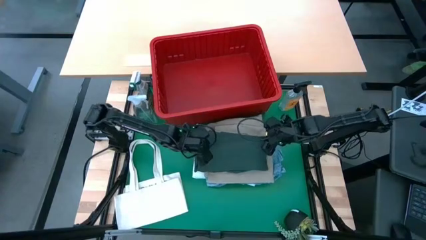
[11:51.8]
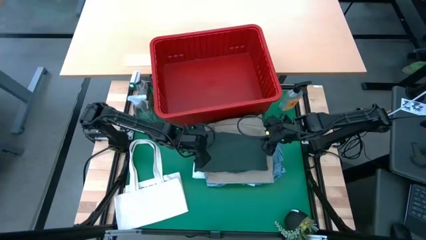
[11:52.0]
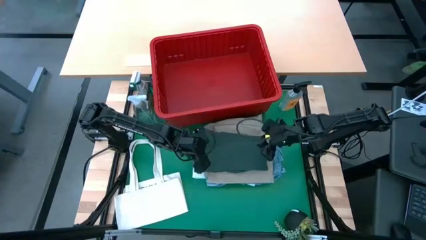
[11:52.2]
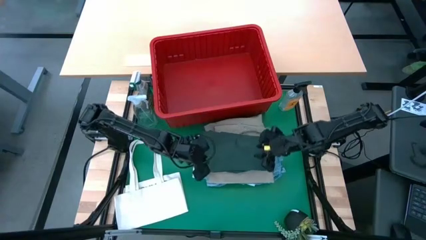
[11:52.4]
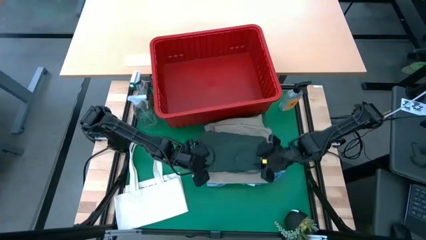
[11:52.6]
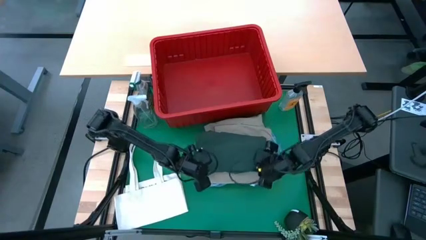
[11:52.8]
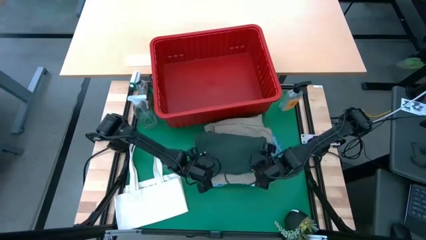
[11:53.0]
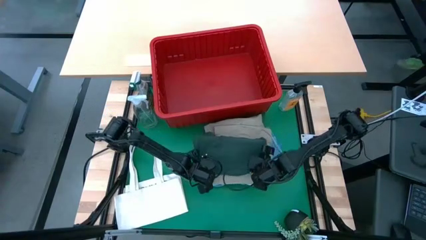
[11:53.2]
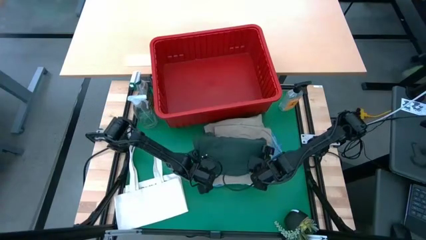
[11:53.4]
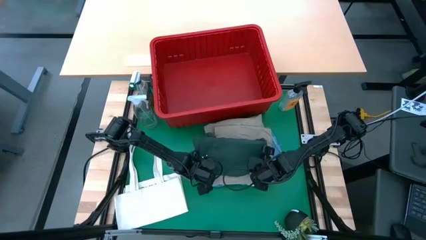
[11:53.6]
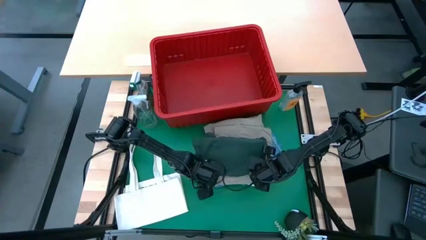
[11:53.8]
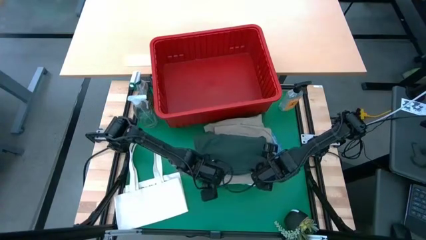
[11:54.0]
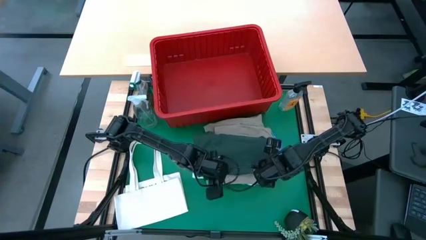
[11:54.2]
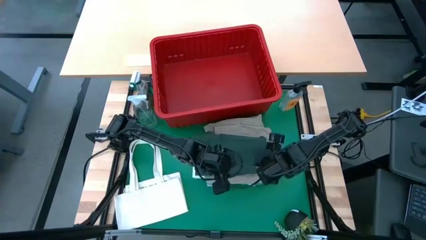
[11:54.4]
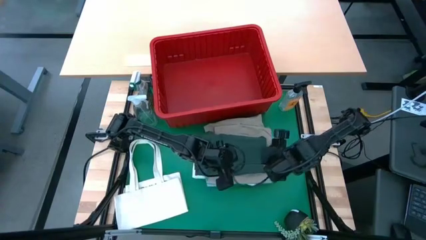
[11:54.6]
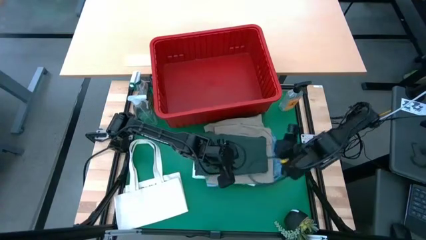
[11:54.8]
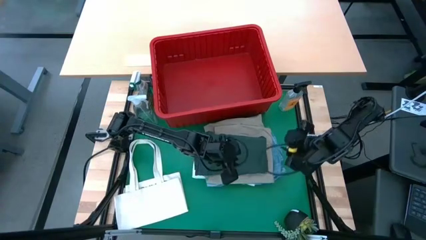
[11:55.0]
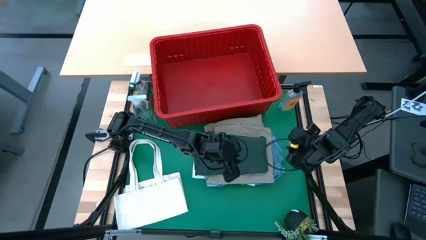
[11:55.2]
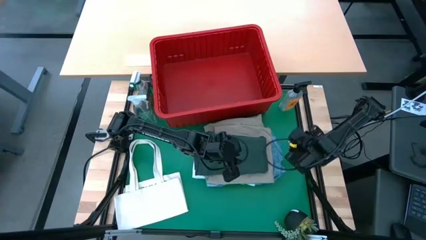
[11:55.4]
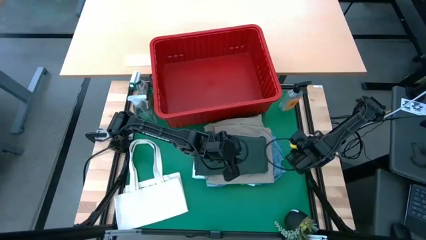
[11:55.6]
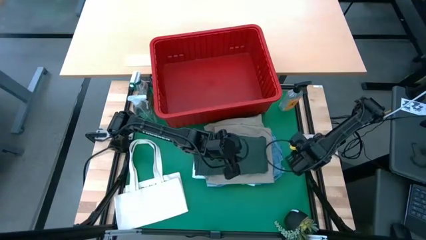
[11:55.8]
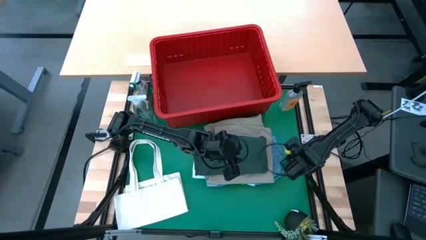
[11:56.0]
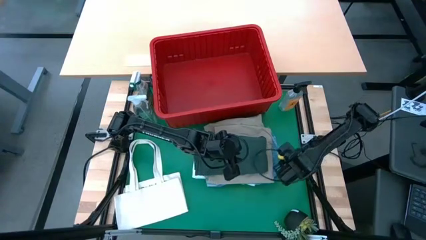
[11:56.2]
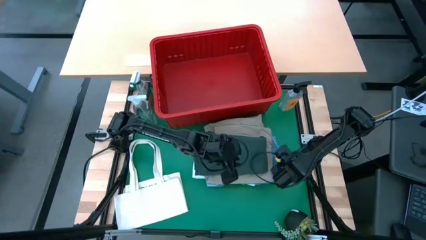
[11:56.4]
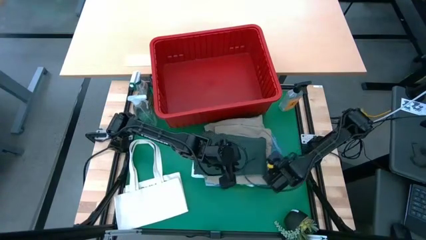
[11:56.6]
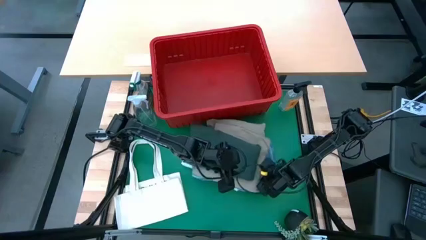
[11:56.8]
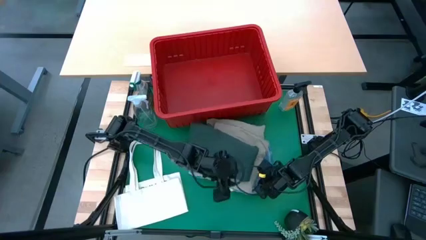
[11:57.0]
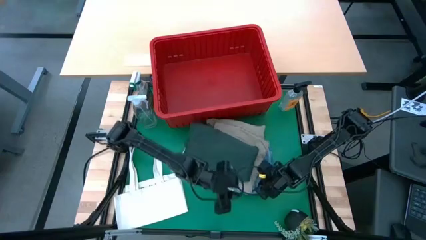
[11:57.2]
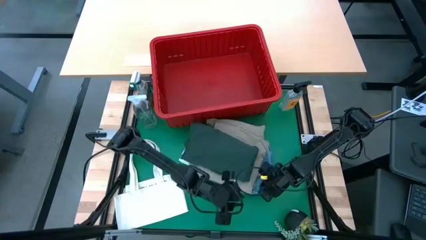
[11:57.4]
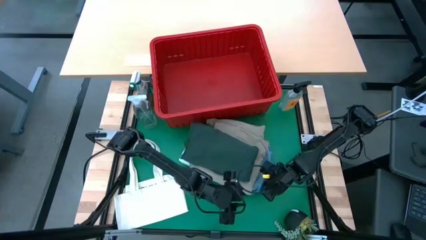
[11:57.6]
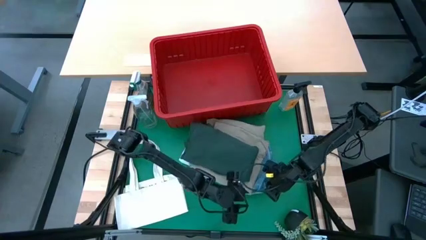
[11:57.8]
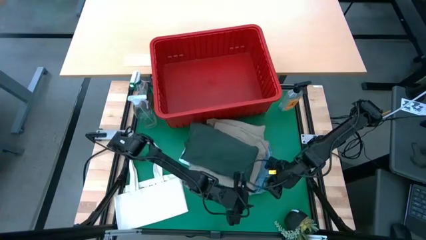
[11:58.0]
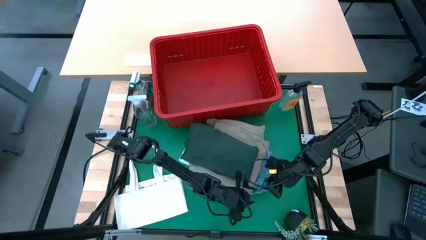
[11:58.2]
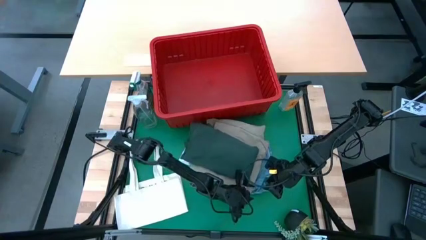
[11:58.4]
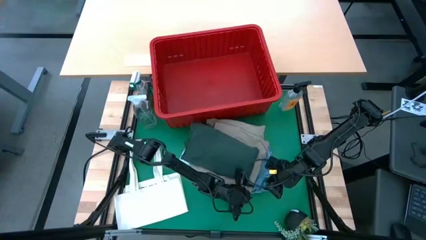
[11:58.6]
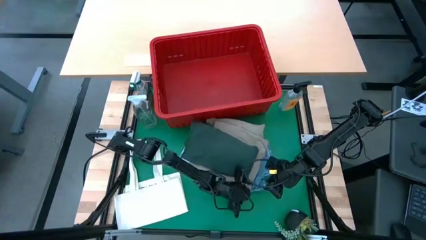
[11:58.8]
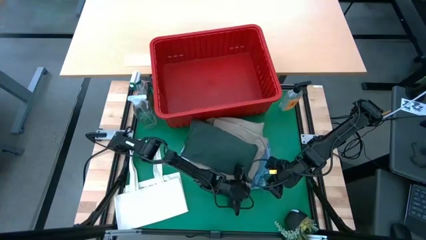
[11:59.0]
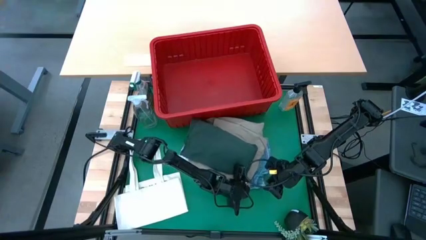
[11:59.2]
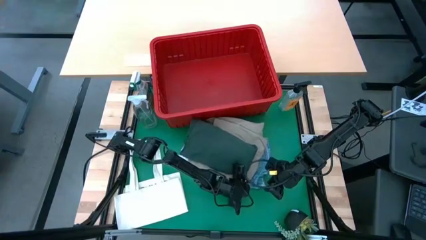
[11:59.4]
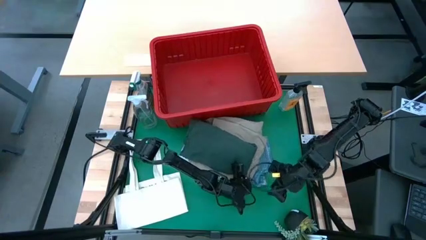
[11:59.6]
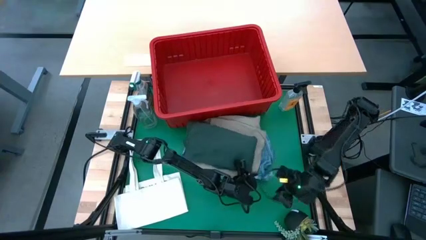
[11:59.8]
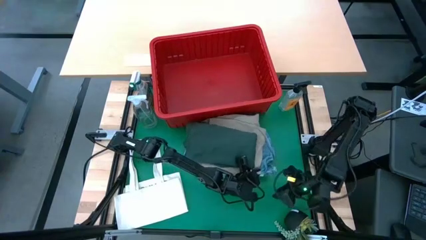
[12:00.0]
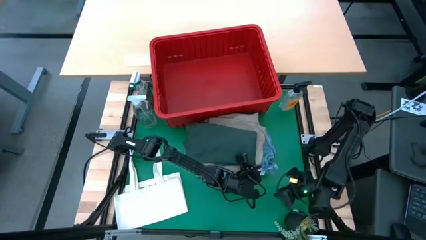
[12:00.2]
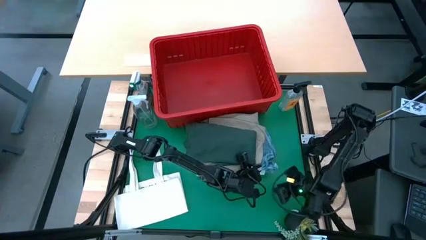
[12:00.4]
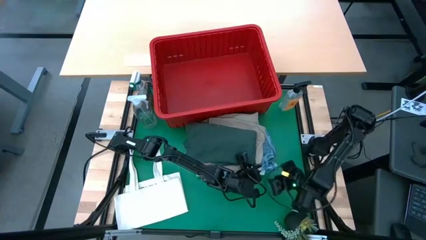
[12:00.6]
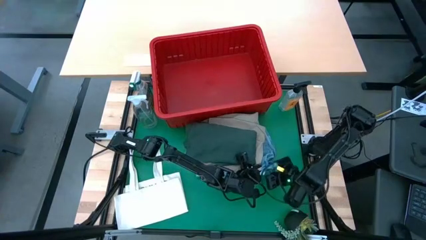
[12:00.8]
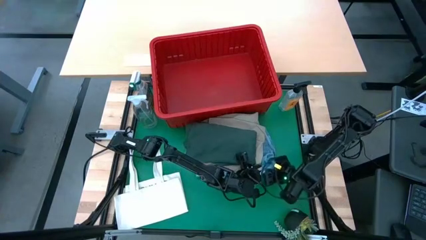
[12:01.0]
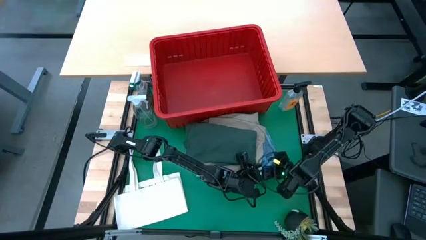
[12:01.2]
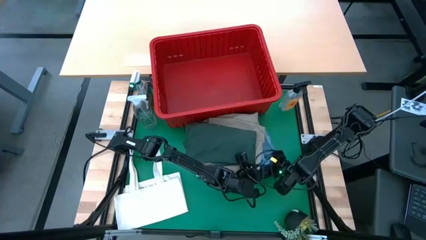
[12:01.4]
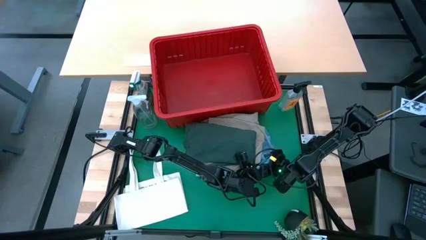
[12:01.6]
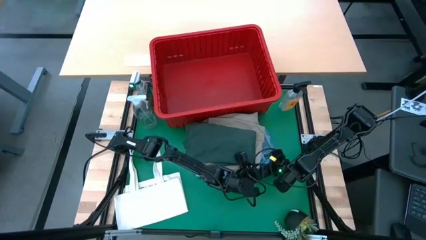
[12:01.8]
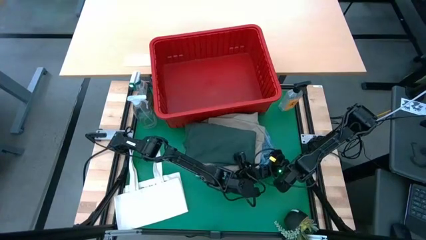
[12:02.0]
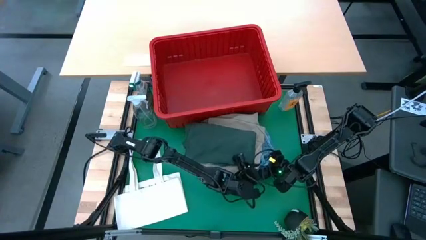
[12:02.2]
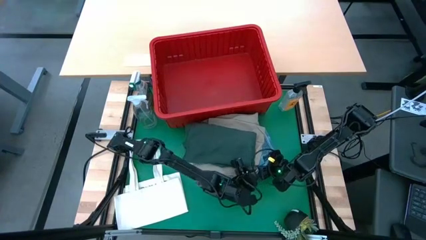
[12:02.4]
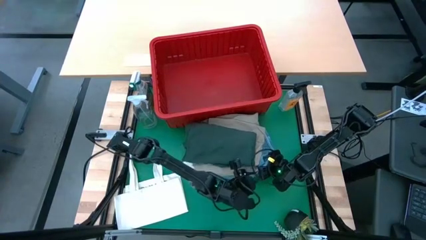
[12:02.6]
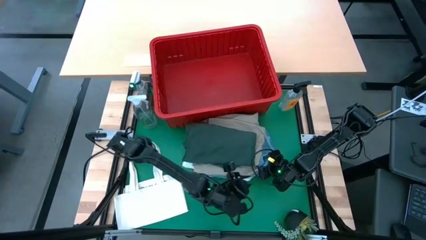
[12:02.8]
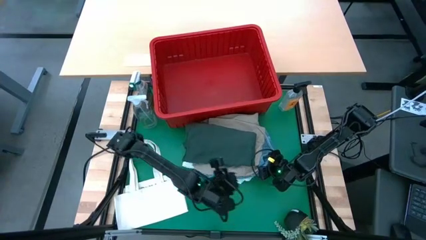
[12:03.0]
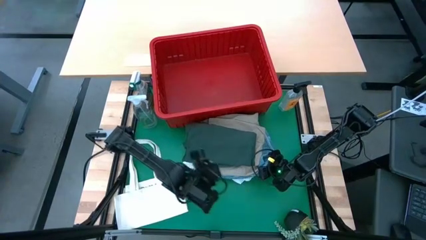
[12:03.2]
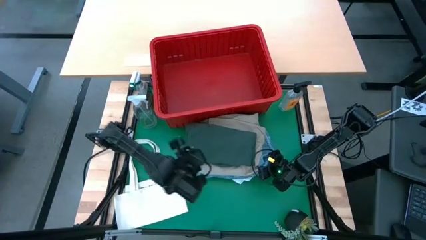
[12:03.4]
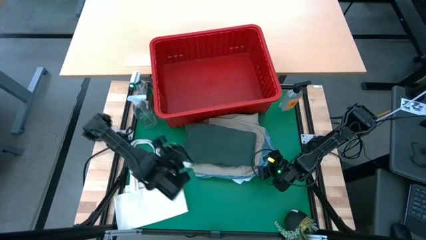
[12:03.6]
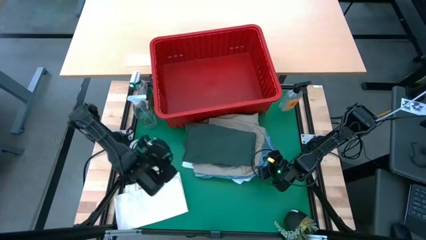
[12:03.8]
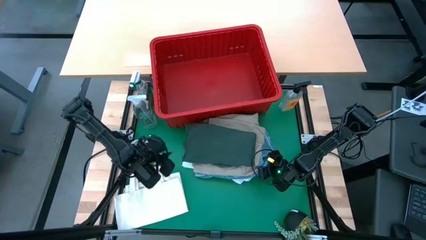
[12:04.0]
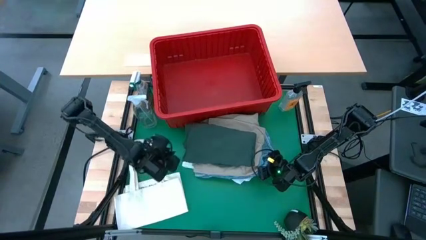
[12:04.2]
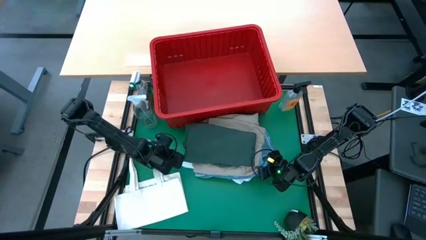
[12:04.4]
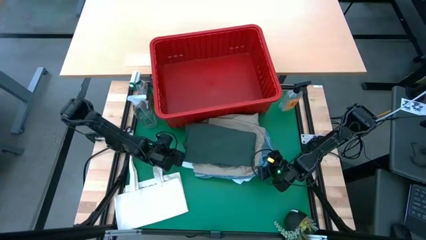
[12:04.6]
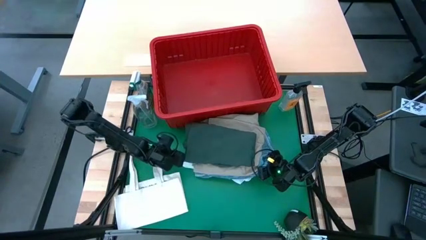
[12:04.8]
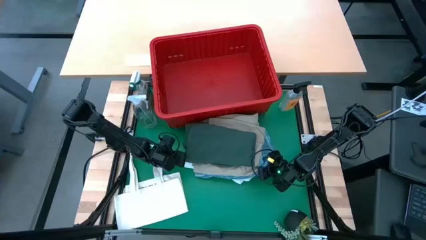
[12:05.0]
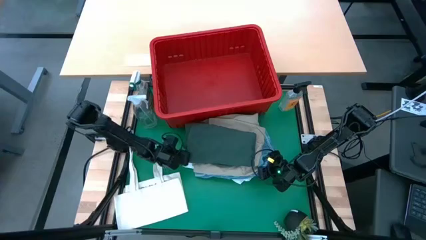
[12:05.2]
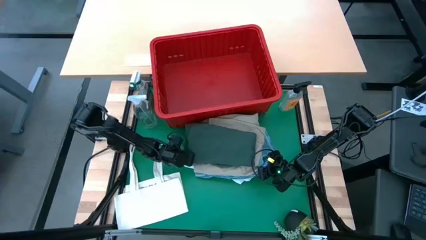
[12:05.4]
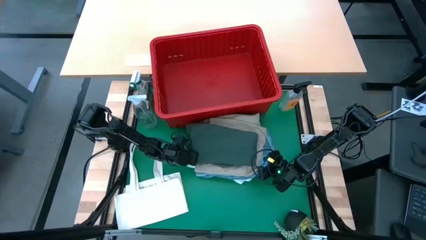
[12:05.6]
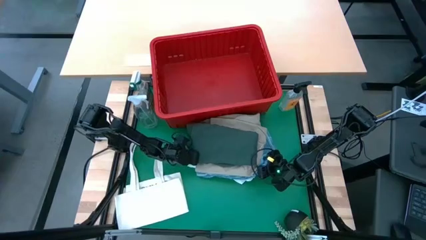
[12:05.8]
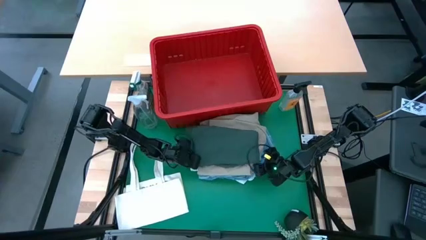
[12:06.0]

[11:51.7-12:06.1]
Task: Fold Laundry from Bin
Put the stack of folded clothes into the red bin
